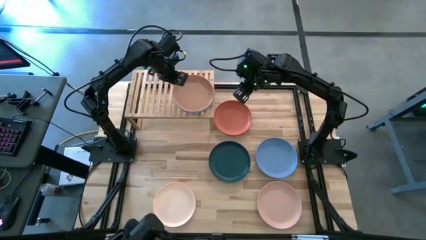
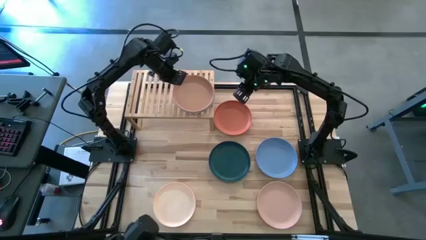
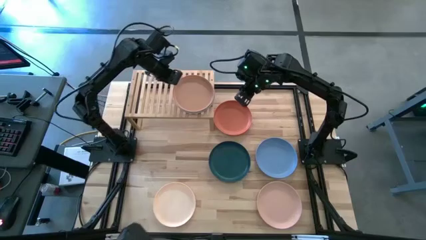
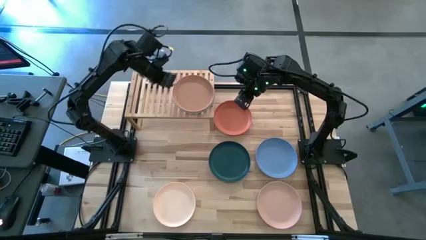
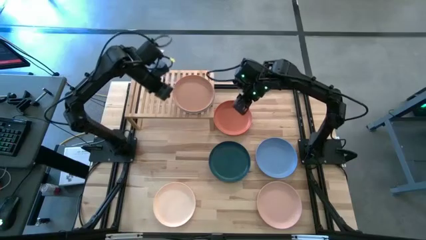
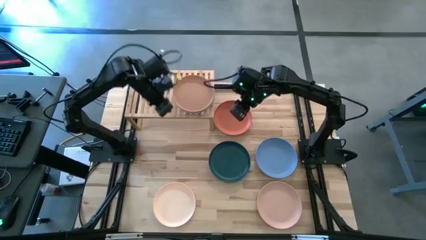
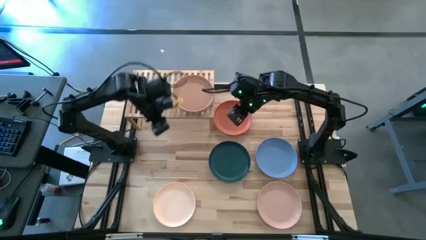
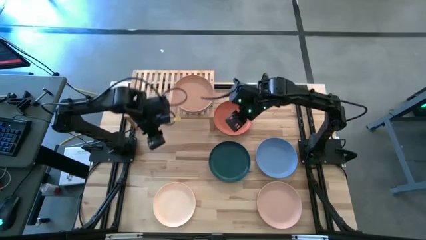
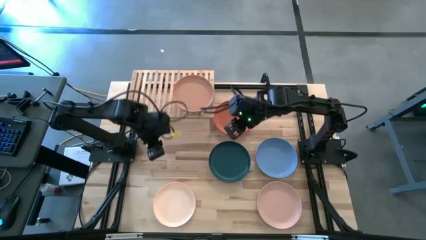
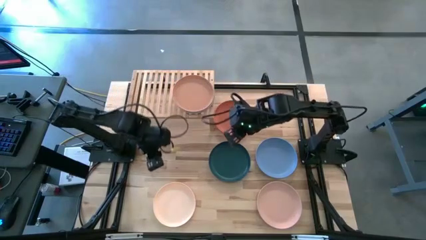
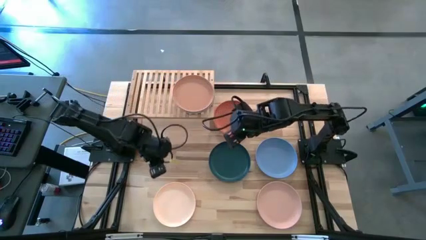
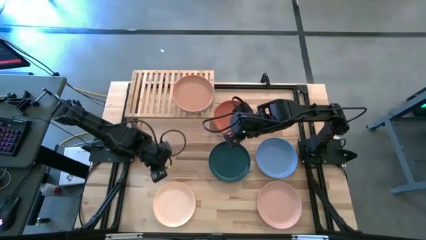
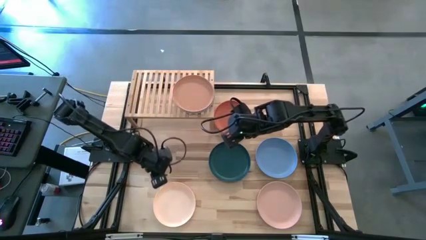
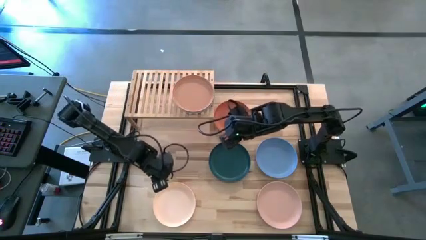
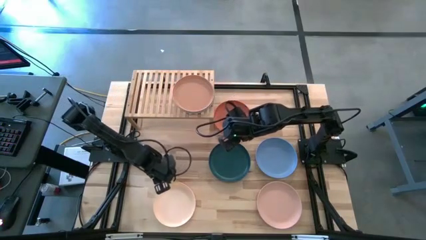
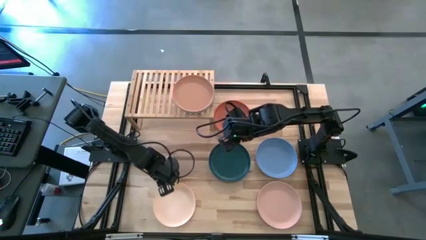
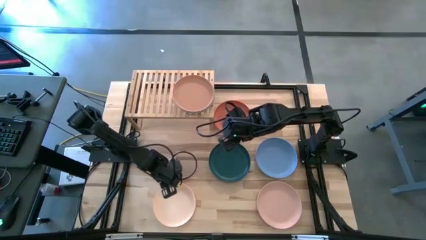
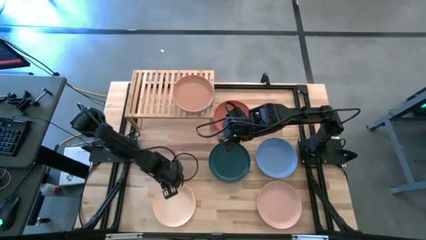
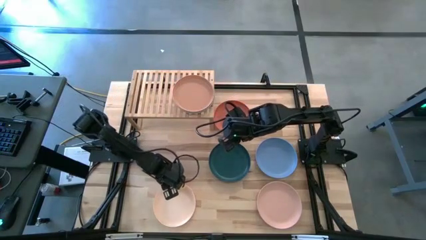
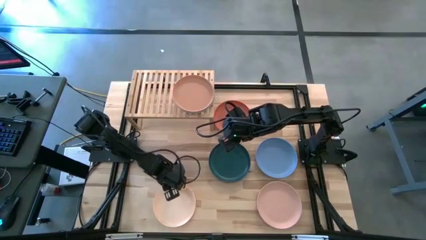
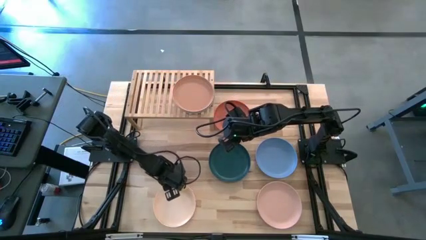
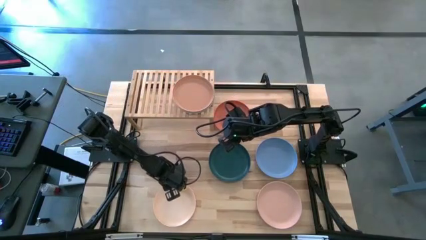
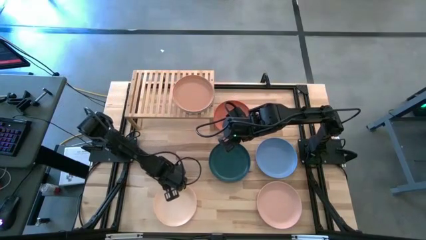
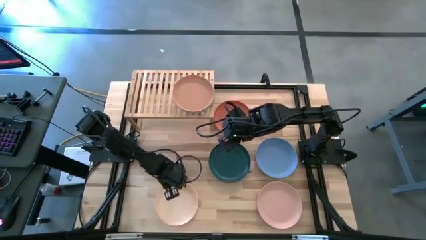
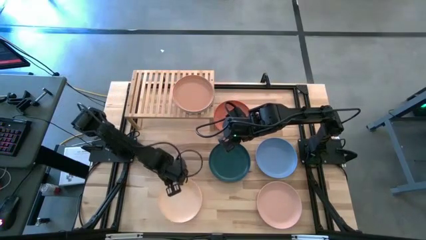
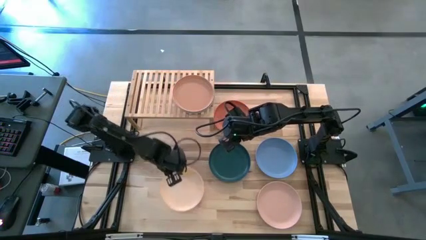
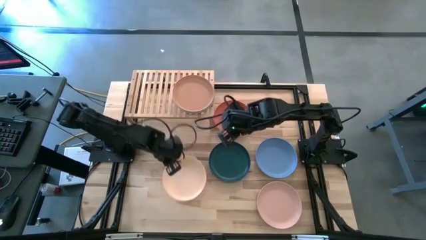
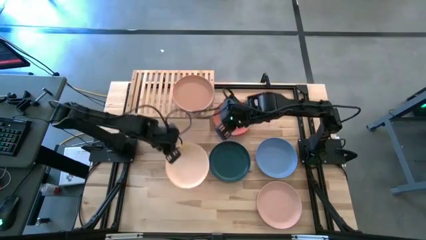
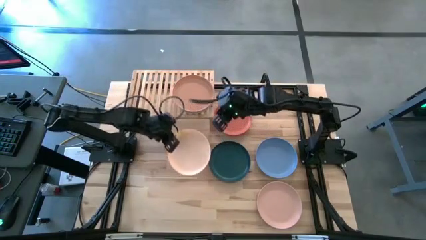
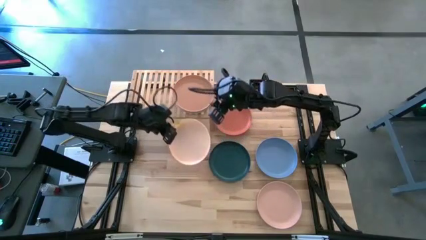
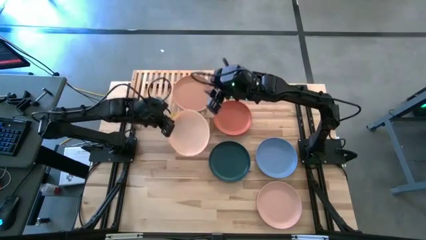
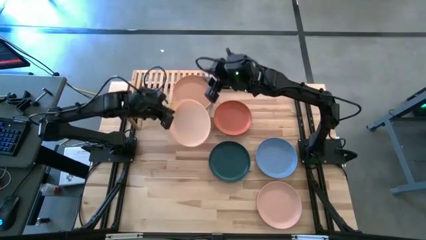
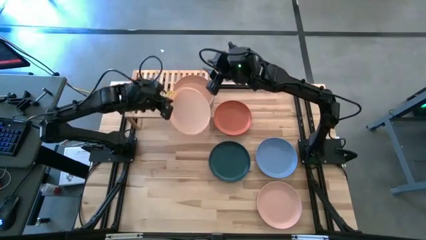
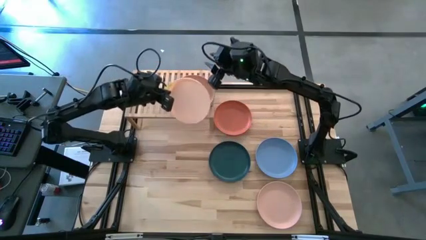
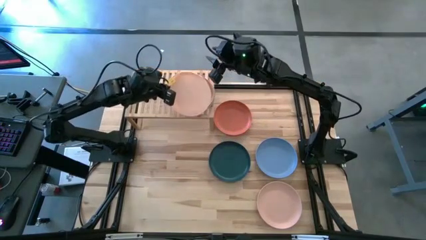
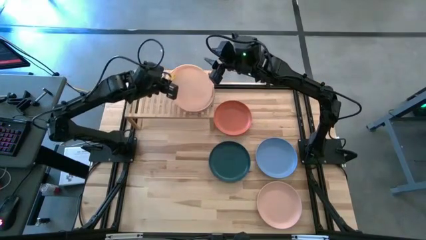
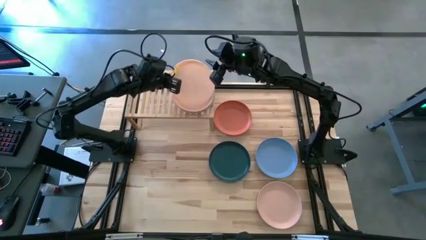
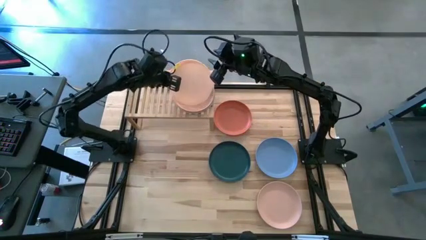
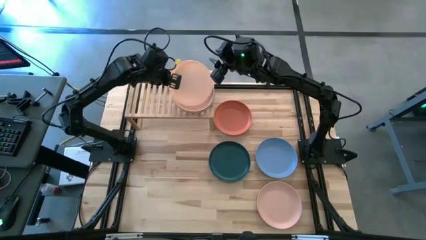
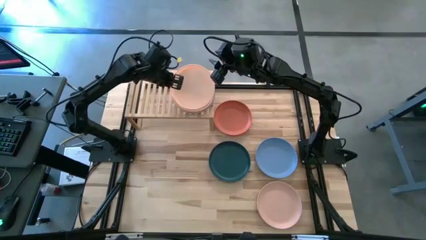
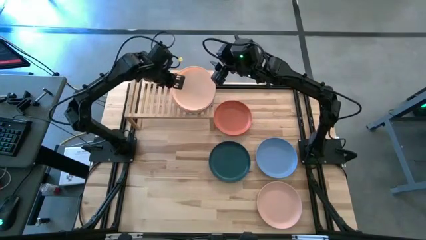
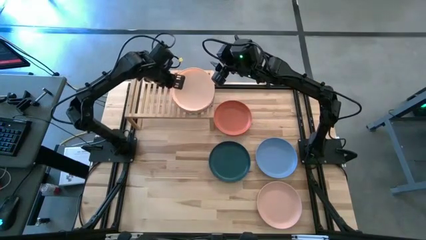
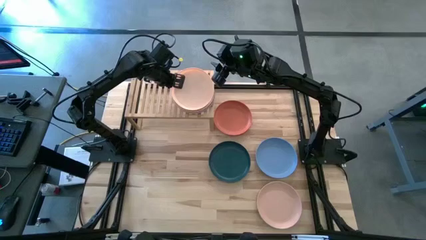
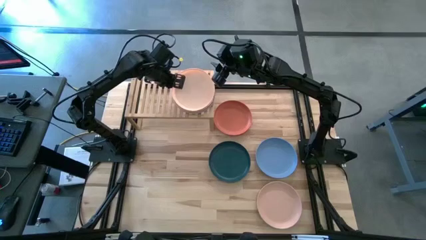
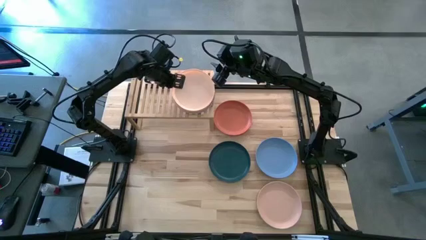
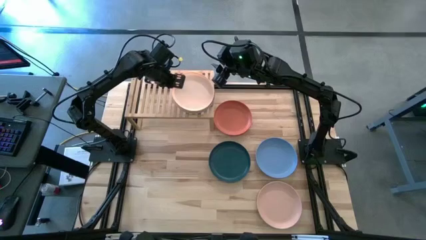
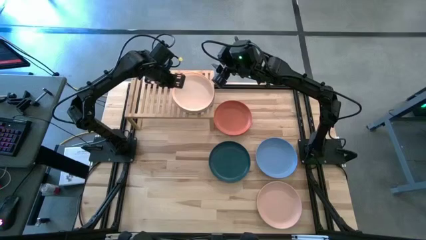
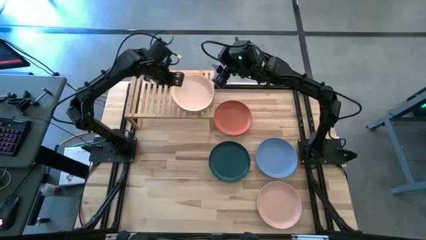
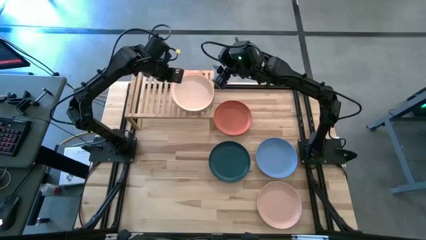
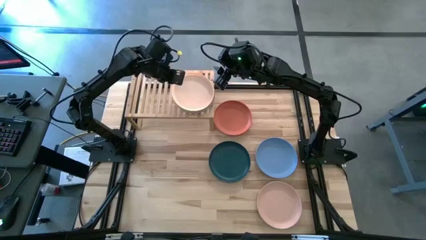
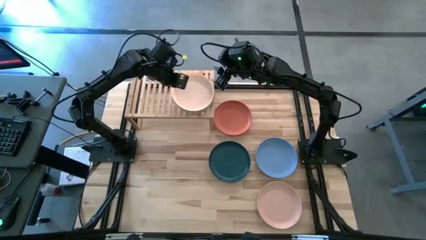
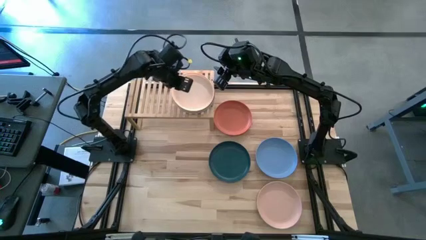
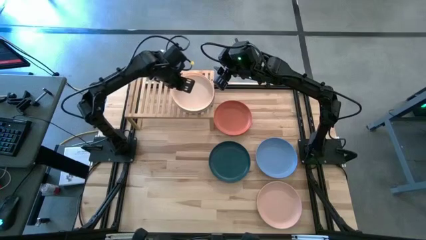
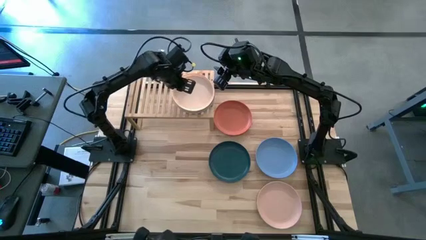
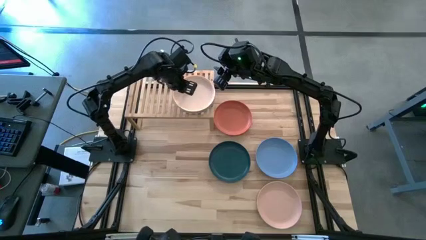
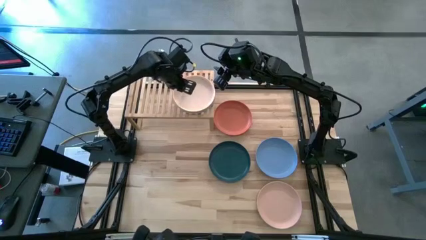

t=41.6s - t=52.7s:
Task: Place and stack plates onto a shelf
Stack the light orange plate on top of the brown plate on the shelf
